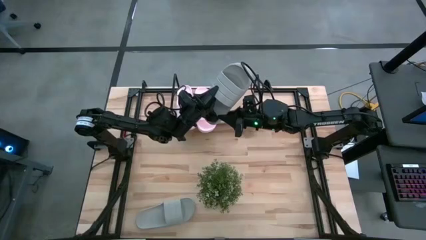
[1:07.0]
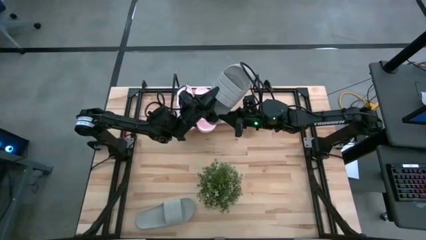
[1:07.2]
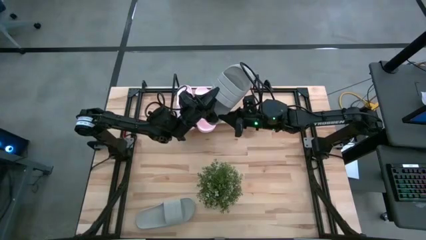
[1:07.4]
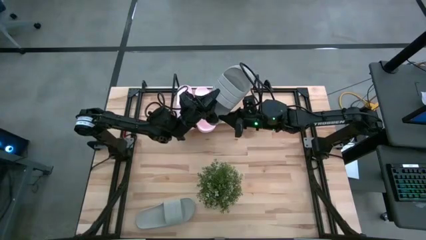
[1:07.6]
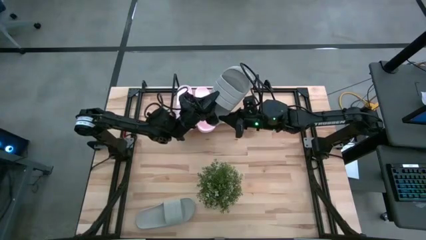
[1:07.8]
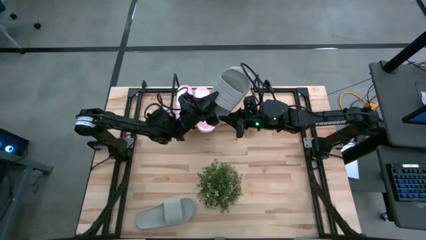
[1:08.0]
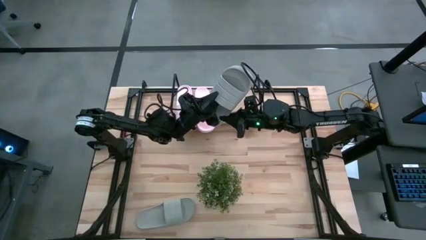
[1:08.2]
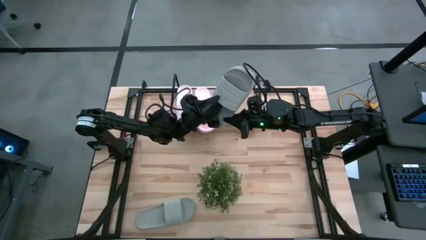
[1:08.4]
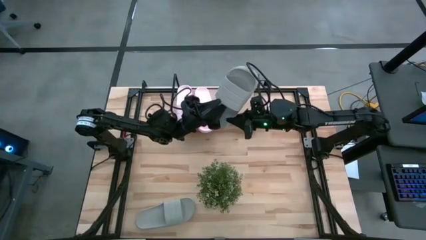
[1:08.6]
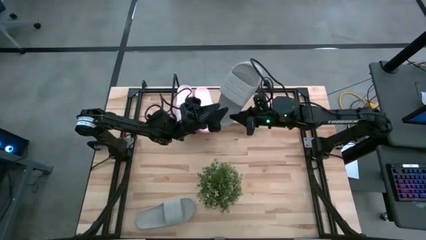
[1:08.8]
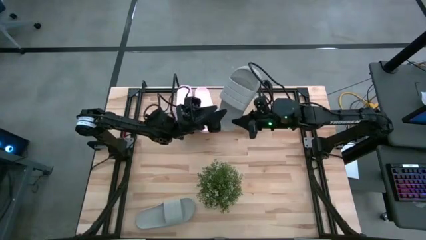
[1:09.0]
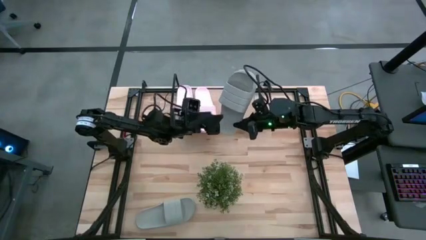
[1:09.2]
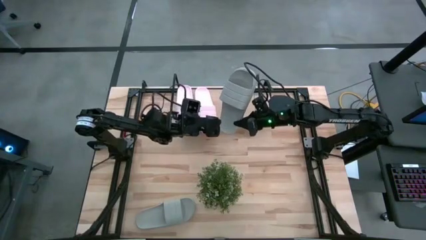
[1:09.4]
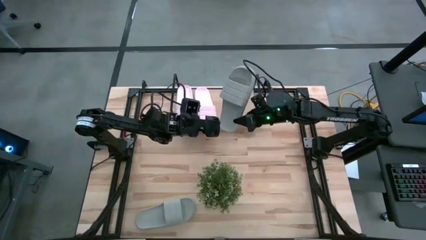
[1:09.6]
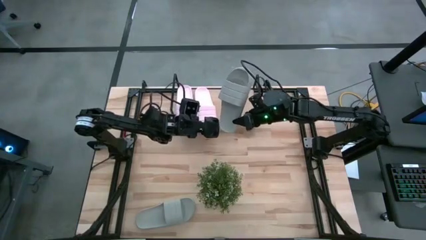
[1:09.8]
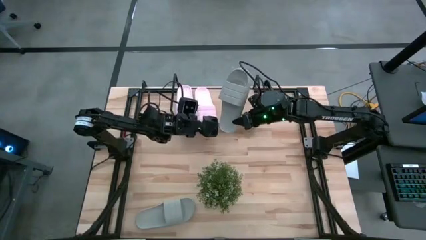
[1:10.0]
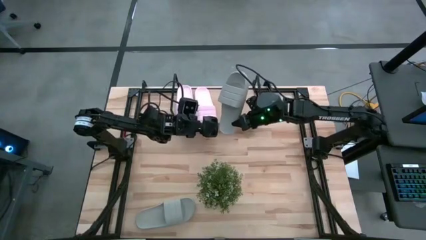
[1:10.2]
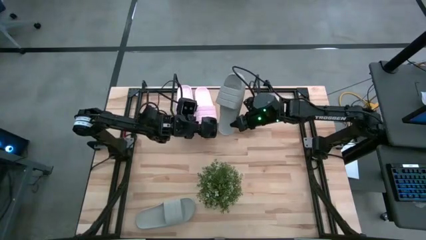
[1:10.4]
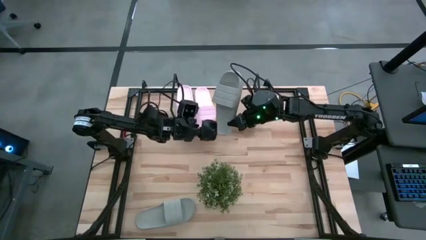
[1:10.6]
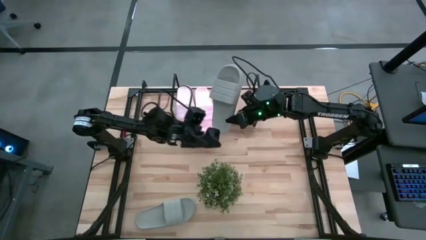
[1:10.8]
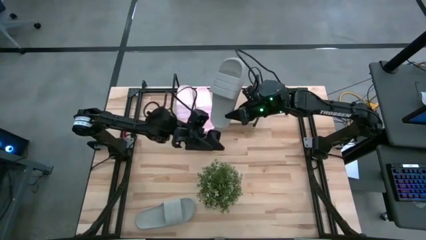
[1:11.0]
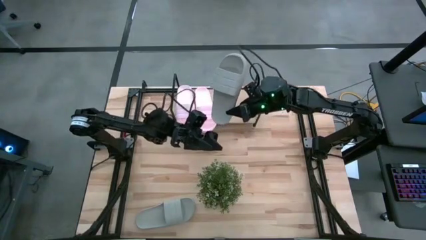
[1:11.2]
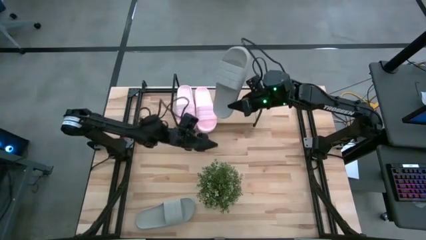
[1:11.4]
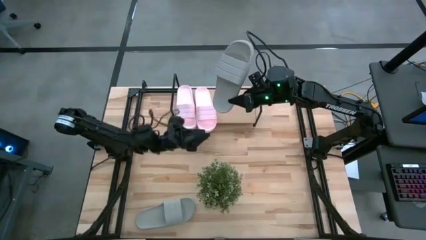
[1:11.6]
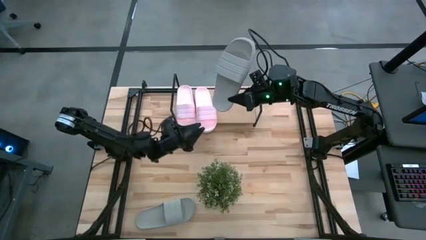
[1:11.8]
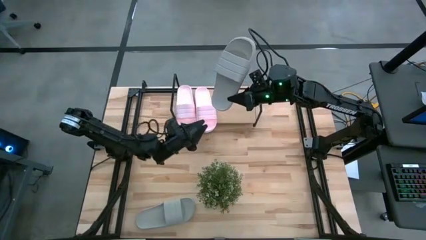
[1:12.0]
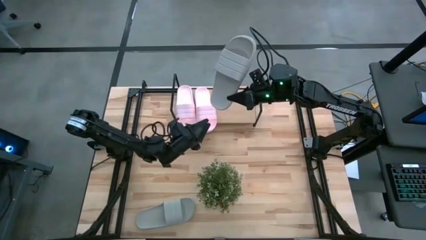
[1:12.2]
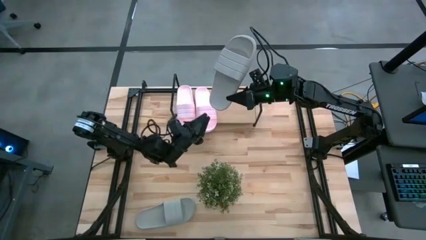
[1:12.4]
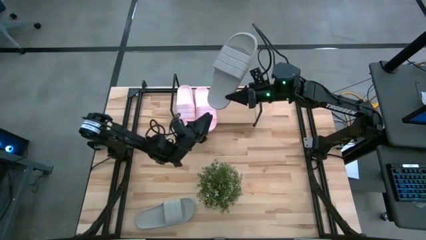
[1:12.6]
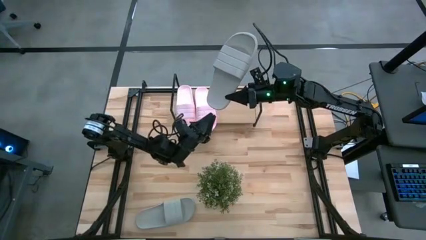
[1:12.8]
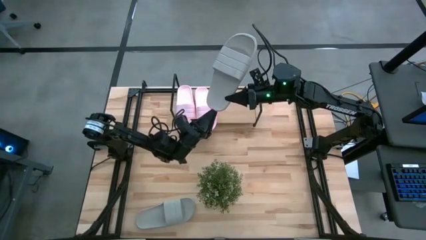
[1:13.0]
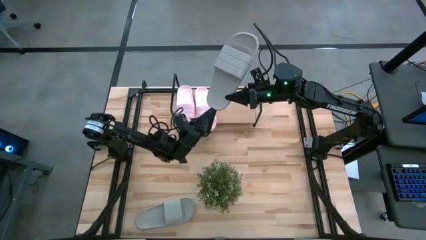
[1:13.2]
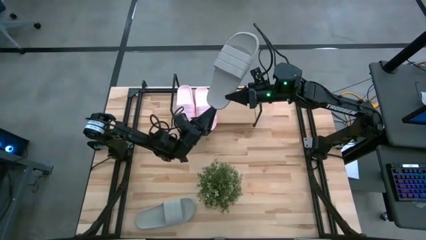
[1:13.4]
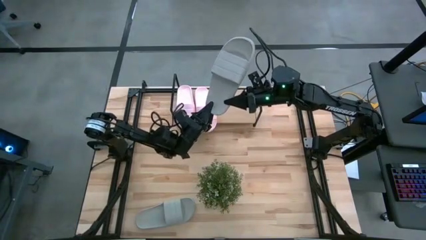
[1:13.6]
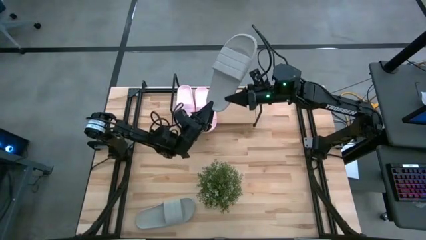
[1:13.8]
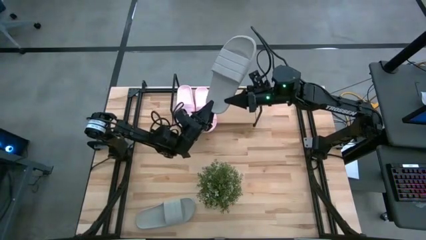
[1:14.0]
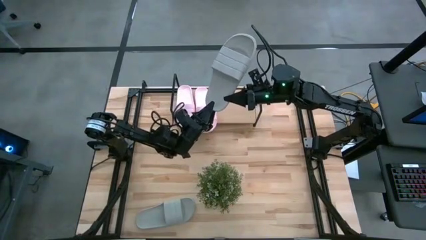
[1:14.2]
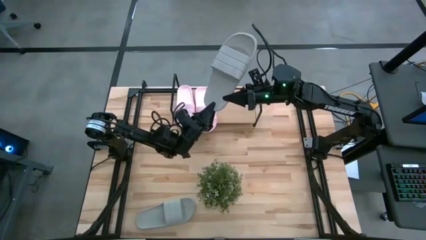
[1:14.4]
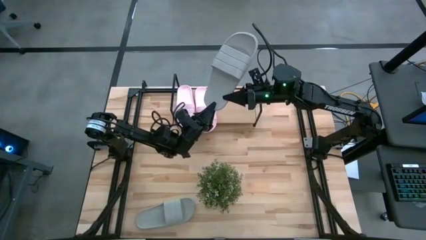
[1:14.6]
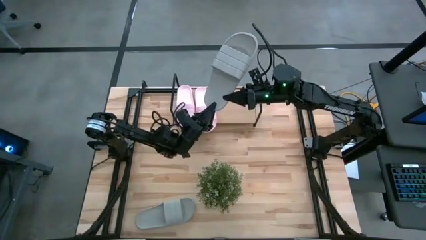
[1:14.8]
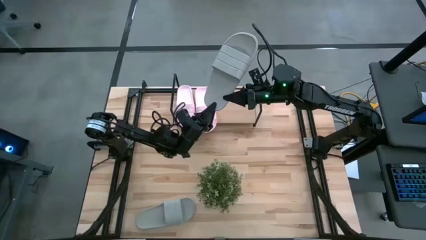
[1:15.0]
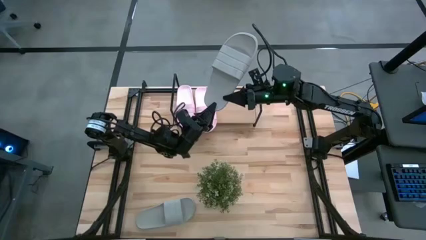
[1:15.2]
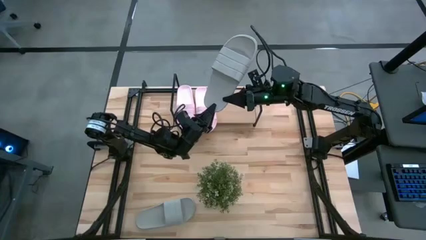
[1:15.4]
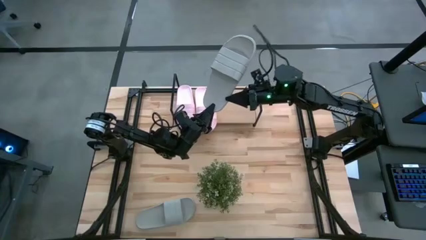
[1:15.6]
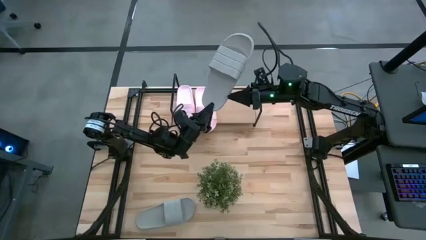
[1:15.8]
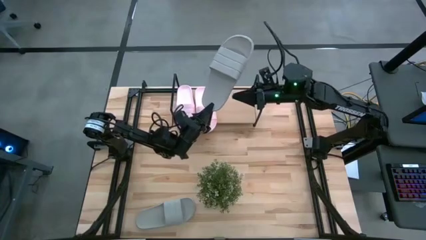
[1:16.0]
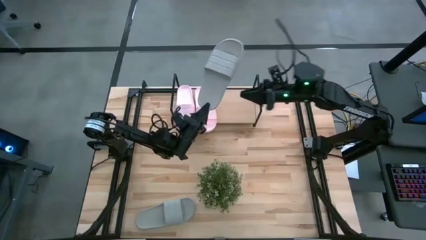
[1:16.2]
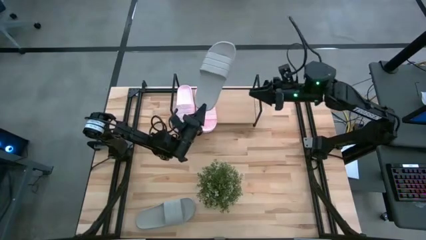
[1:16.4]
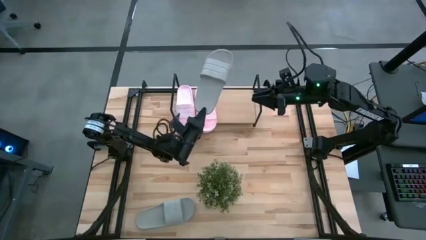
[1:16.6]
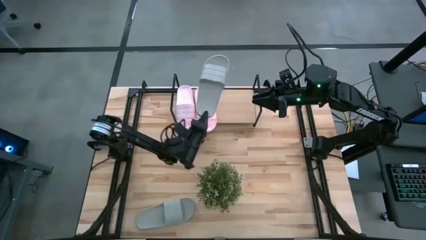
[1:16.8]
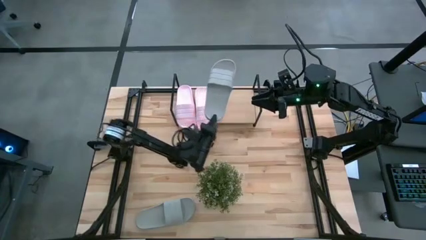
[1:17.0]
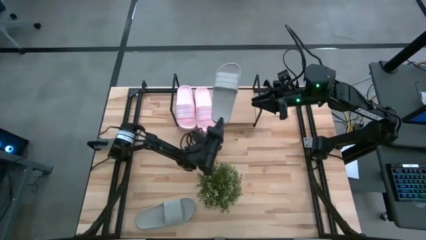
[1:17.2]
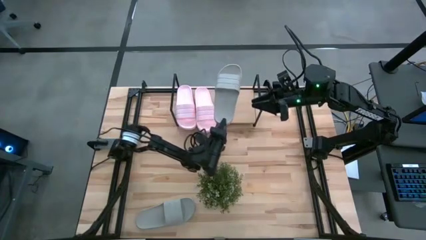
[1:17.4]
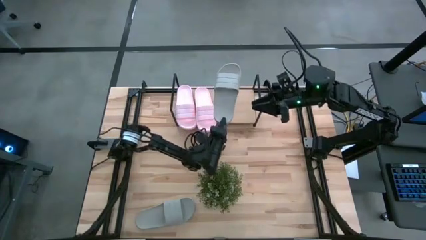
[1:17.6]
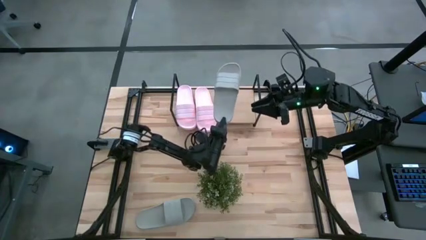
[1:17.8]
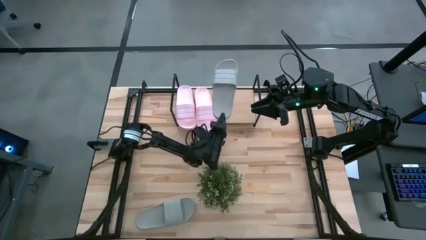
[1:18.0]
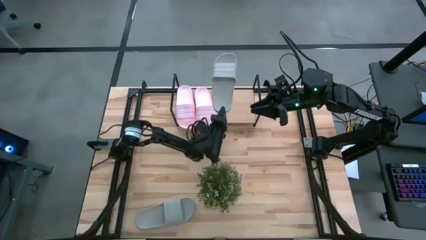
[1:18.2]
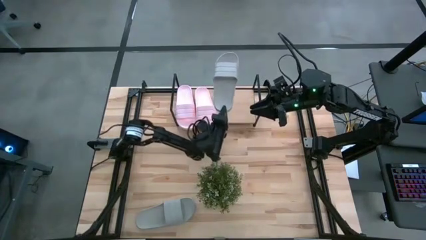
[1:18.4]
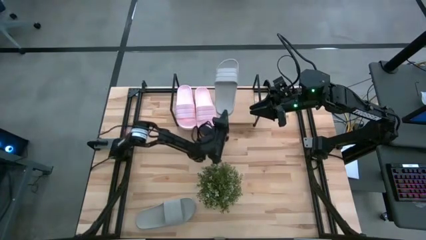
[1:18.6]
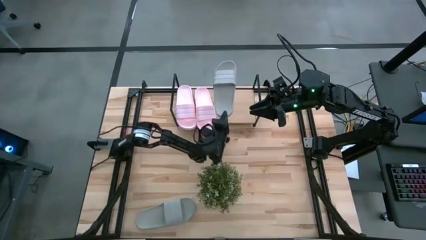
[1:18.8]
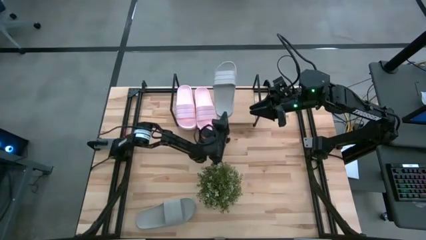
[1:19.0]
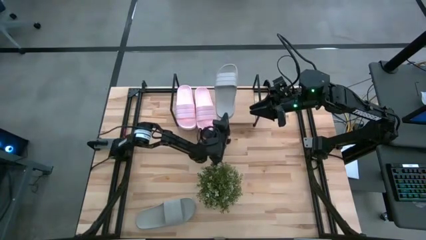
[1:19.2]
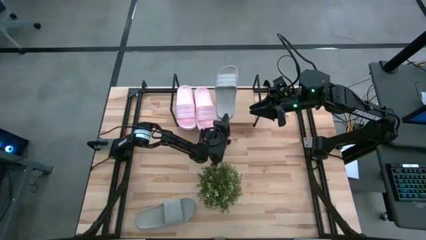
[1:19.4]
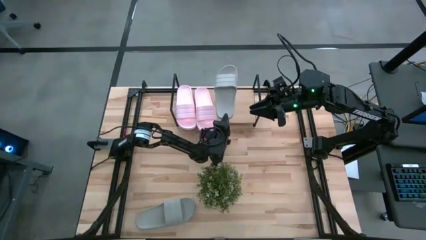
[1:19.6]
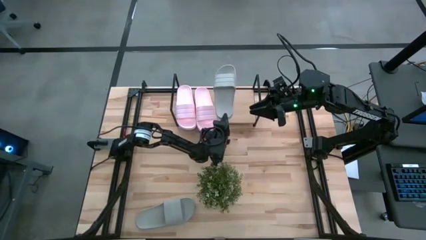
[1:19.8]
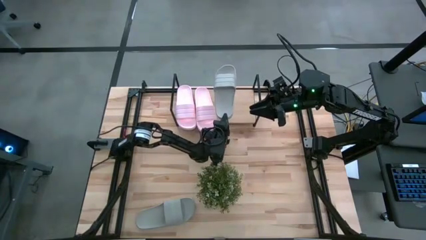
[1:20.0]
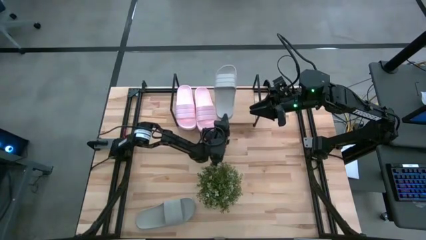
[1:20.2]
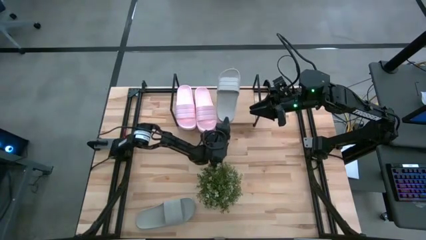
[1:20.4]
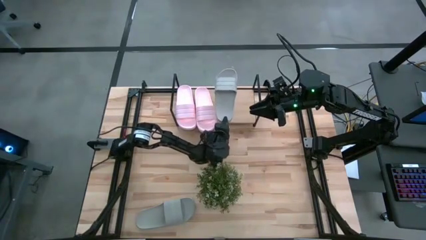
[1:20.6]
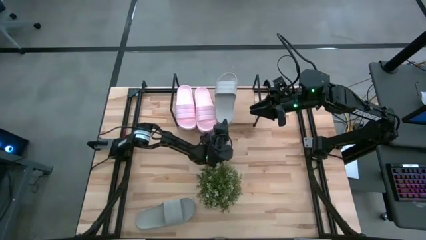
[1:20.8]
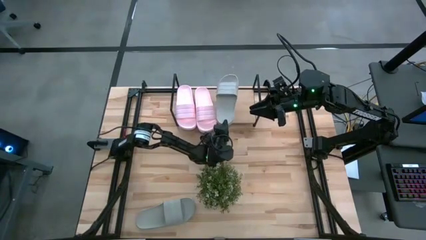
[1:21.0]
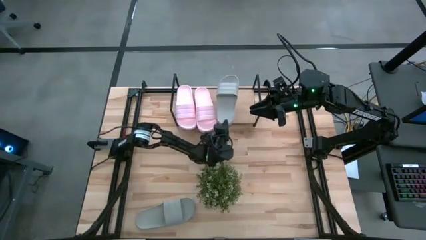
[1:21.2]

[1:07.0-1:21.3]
Task: Pick and place slides into the shelf
Put the top gray slide on the shelf

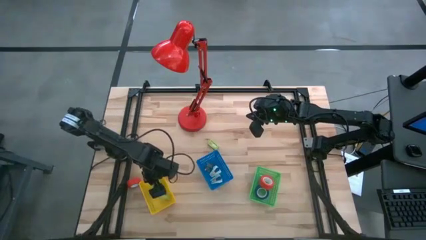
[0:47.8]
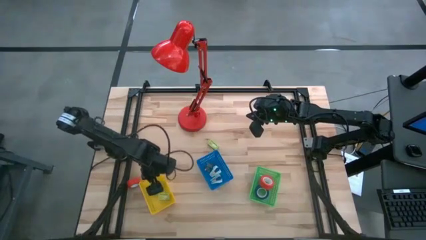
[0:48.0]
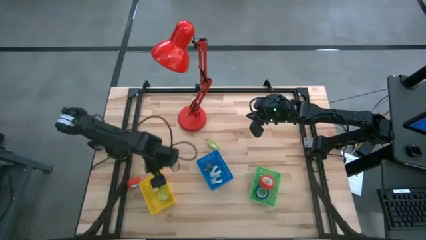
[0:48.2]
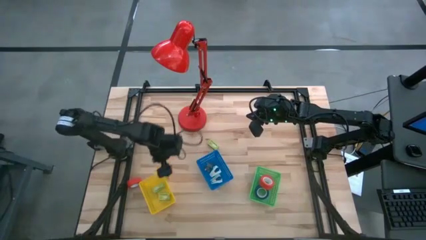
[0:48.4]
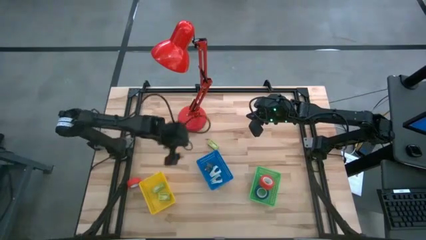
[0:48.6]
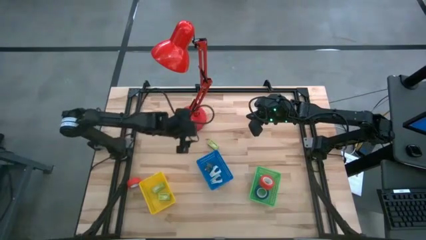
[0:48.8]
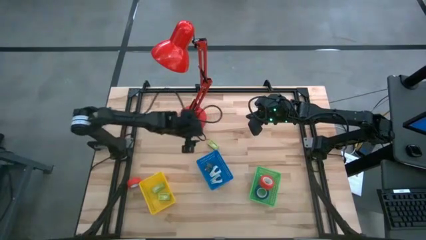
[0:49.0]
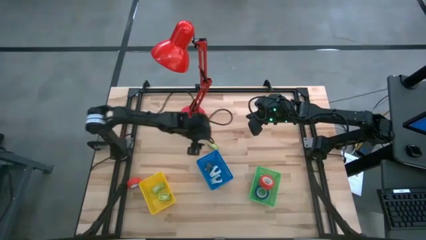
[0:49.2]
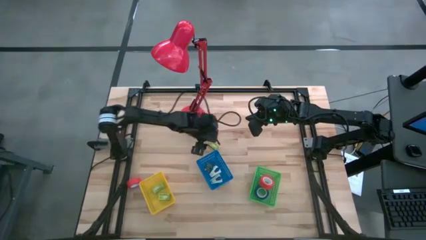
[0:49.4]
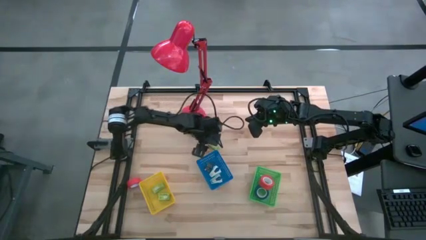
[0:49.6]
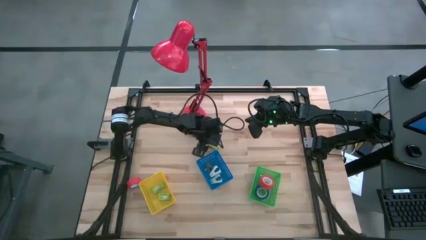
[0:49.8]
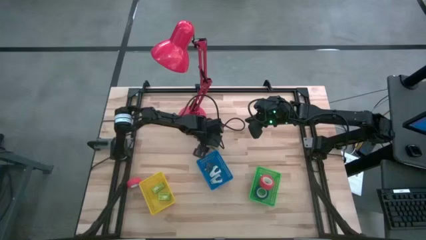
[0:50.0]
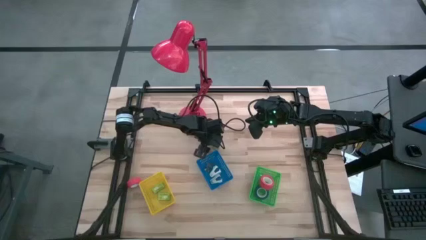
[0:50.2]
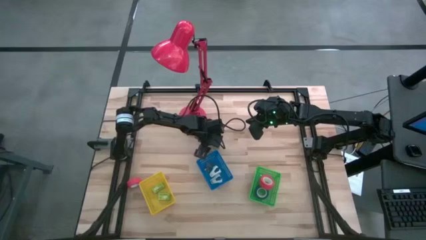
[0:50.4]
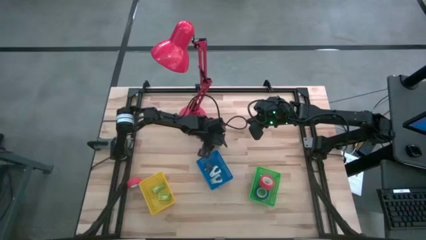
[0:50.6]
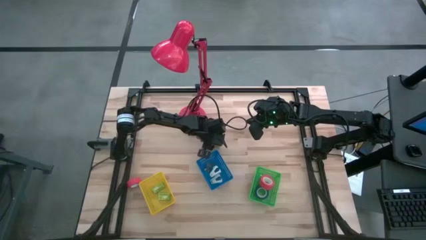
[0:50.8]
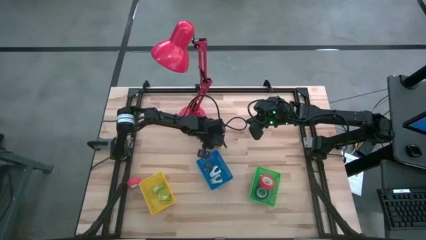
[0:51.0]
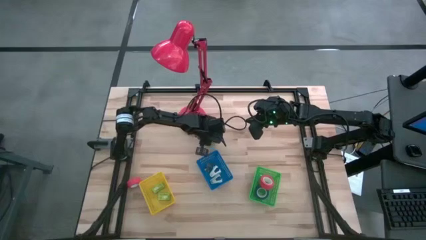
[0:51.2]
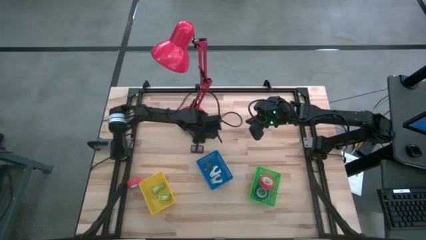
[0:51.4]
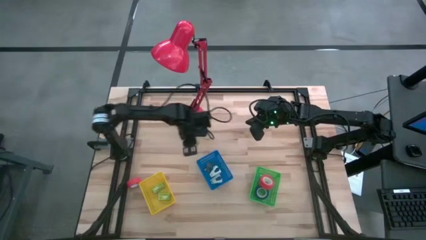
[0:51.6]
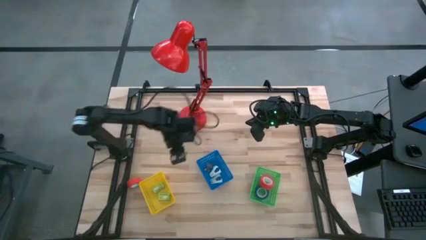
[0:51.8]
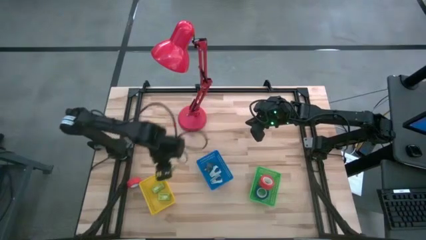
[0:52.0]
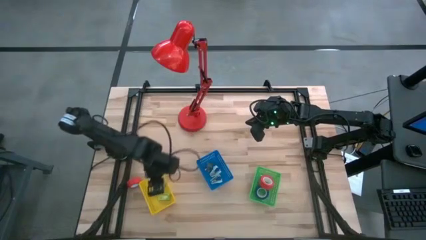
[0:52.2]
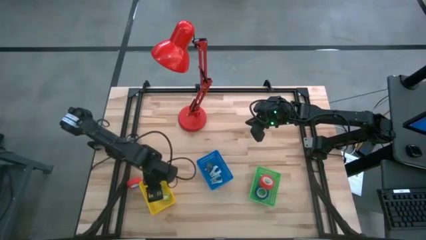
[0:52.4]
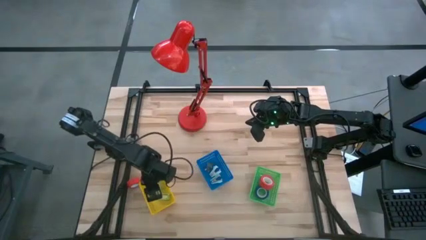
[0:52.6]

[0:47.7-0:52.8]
Task: Pick and place Stapler, Stapler remover, tape
Put the green staple pin box into the yellow bin
